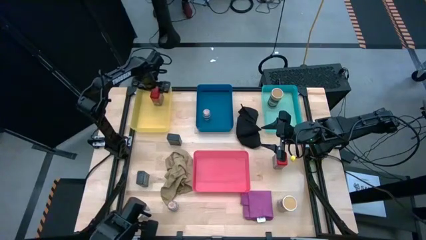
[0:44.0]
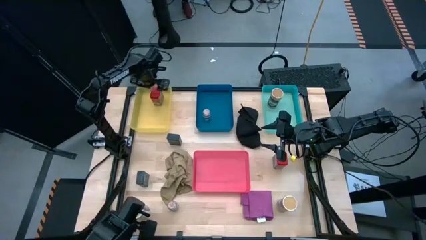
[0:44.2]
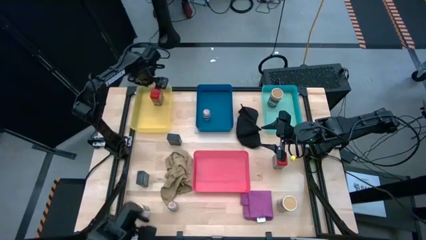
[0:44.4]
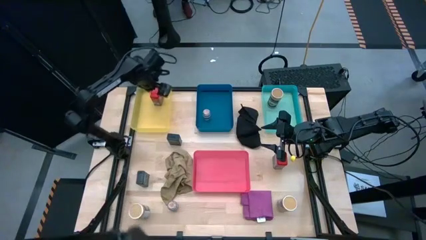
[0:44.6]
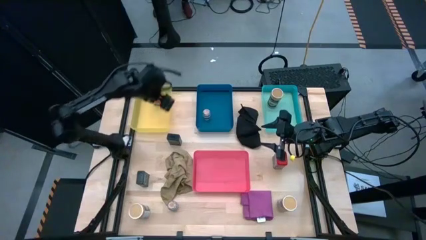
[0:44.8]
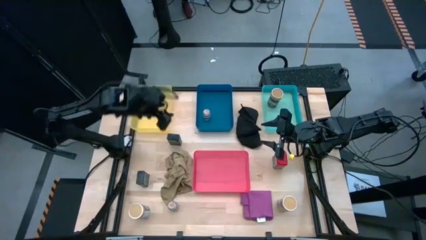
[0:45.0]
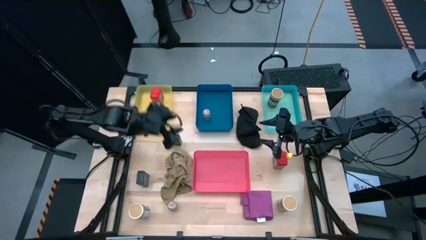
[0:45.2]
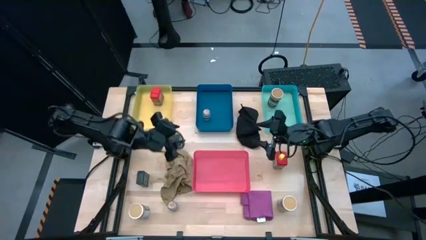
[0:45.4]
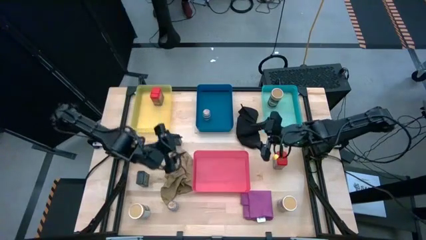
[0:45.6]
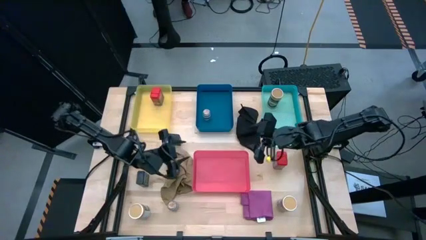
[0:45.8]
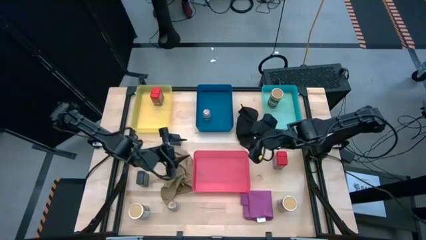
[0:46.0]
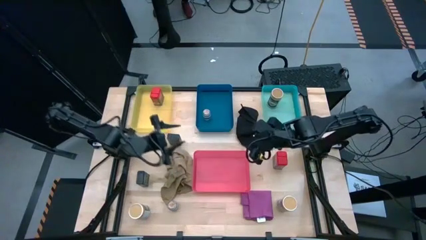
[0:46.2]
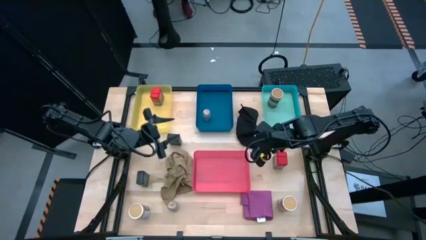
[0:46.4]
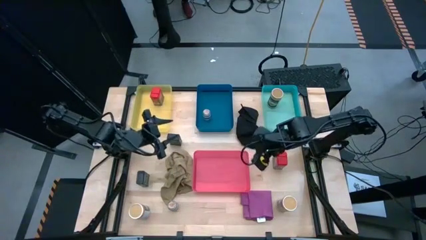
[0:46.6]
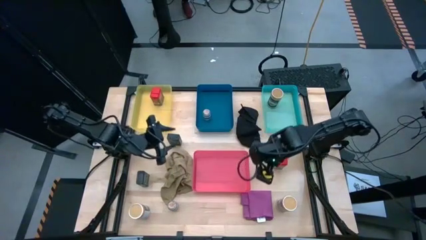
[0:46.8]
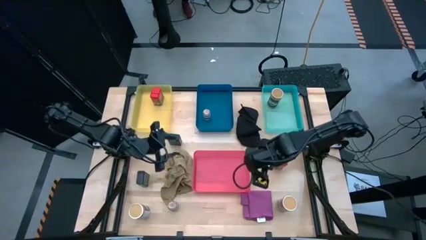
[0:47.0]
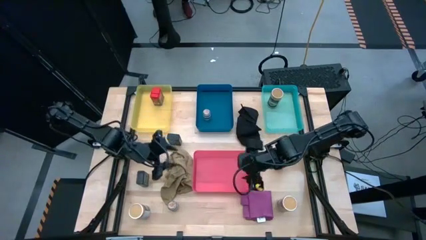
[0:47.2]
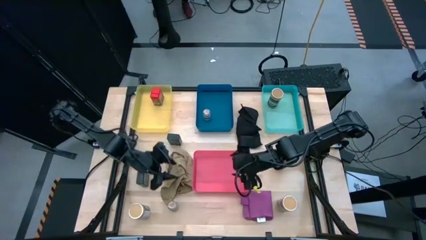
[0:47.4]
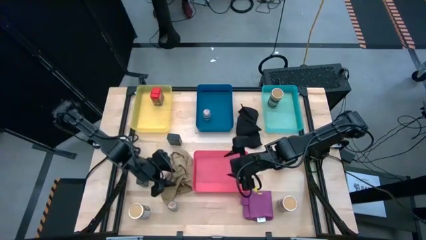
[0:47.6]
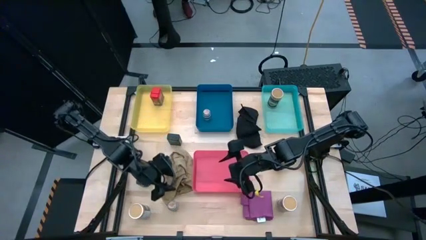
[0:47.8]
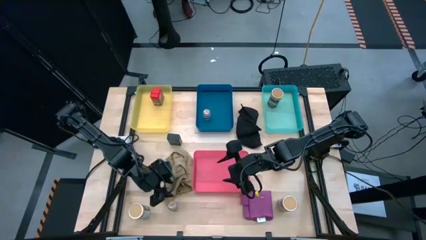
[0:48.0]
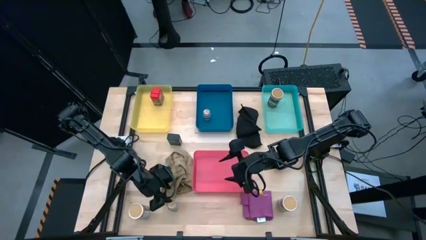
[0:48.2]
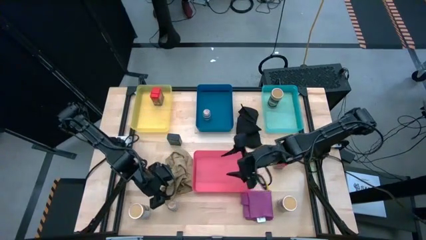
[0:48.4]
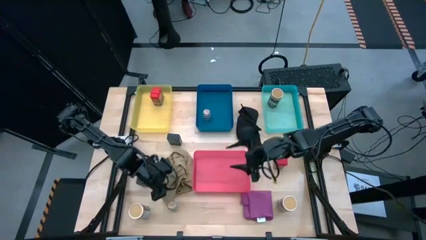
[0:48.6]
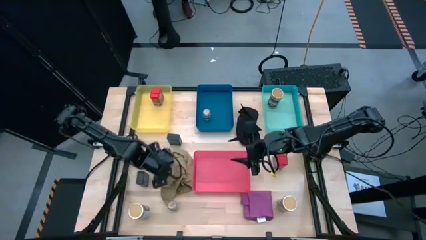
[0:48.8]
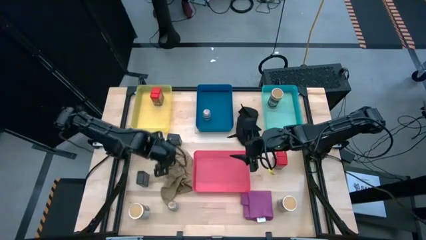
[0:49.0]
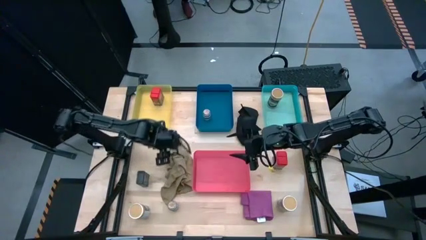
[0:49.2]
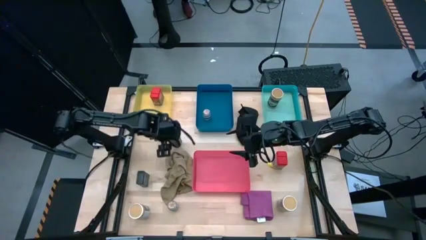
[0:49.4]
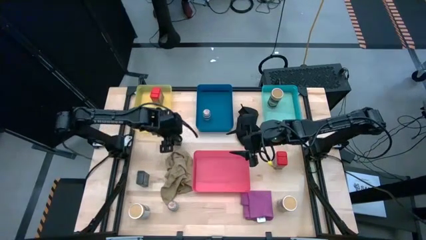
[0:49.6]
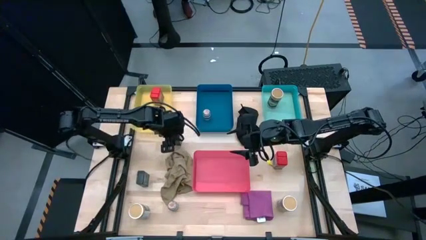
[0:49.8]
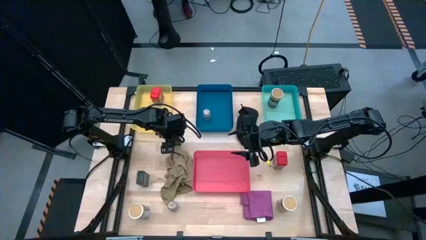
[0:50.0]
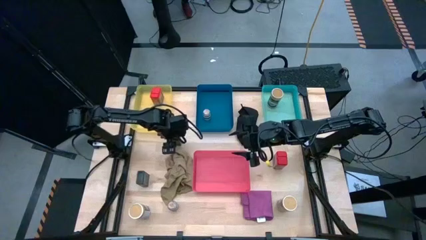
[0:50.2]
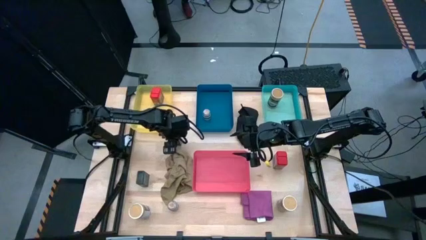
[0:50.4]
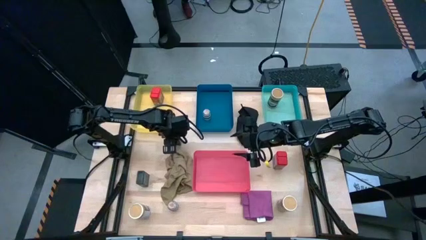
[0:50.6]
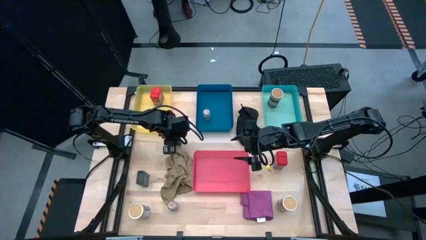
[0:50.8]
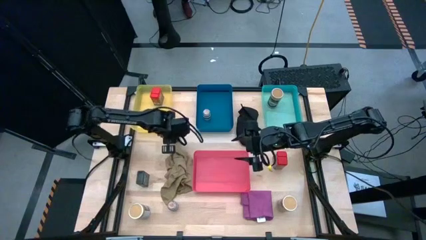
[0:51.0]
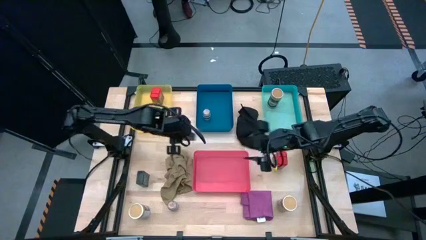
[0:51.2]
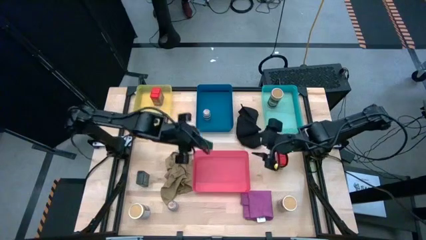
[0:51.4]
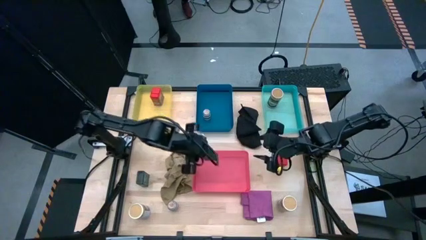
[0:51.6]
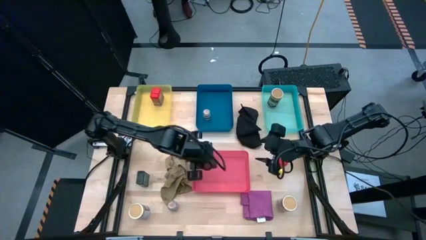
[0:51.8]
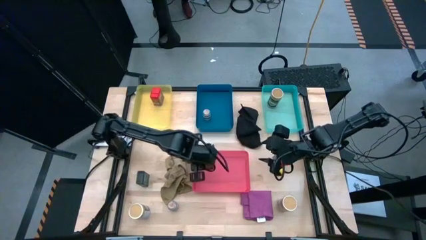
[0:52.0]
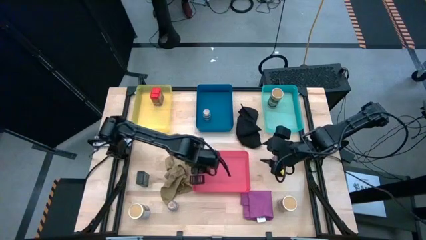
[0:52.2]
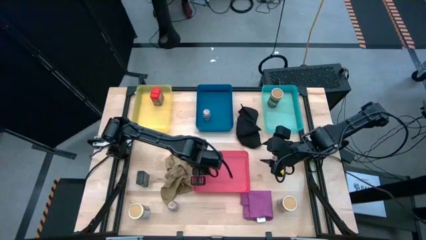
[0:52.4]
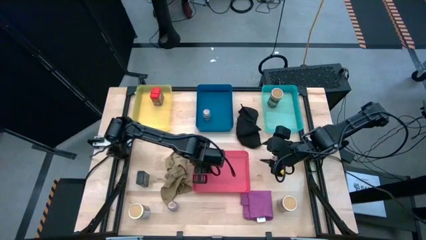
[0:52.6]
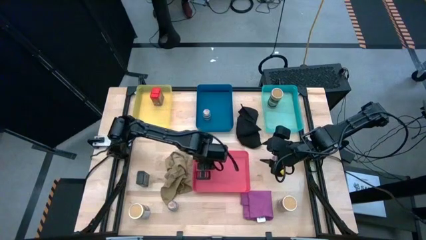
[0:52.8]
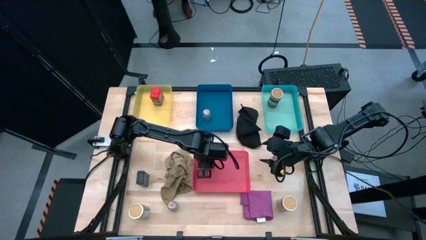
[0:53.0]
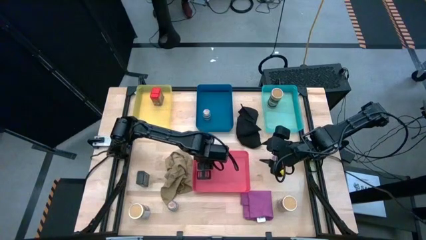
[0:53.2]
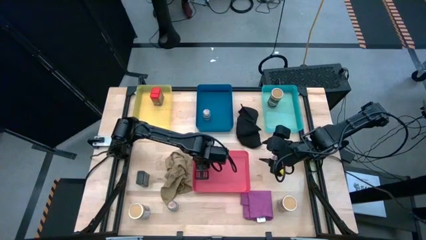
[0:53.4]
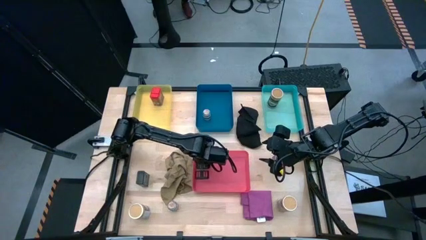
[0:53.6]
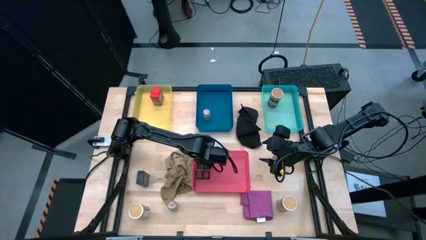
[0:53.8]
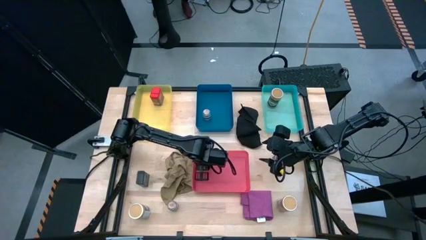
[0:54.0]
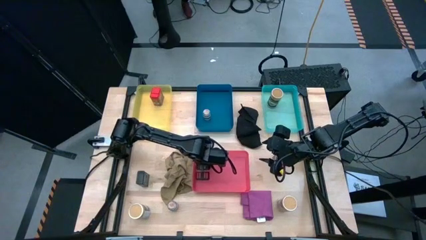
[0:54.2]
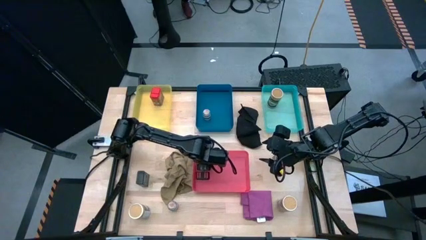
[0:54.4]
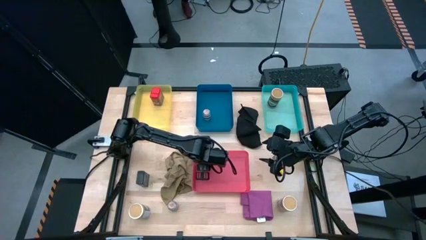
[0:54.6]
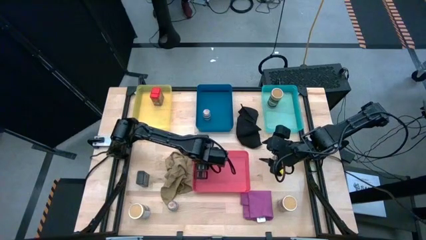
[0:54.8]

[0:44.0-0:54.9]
Task: Sort spices by type
Put the top black seasoning can into the red bin

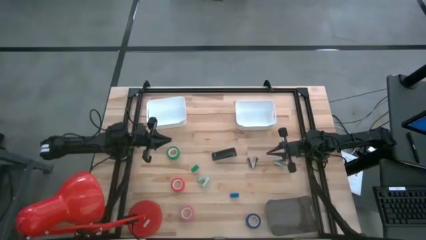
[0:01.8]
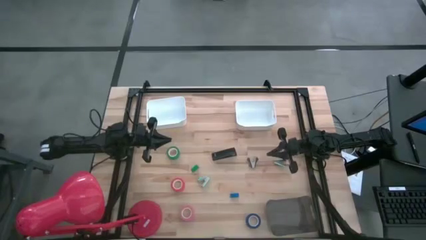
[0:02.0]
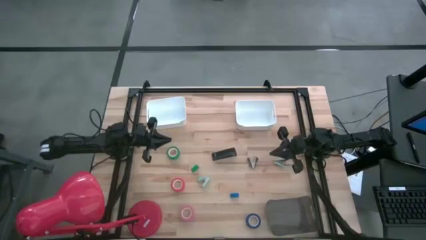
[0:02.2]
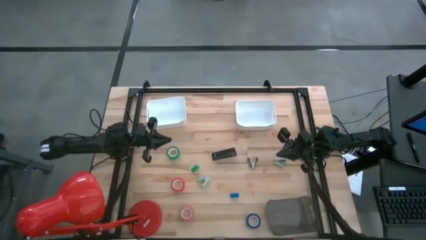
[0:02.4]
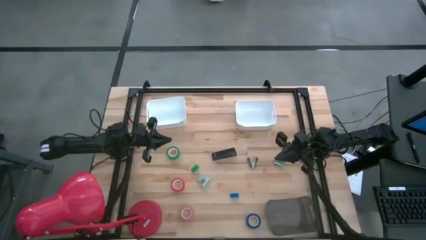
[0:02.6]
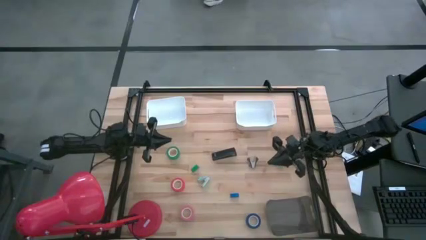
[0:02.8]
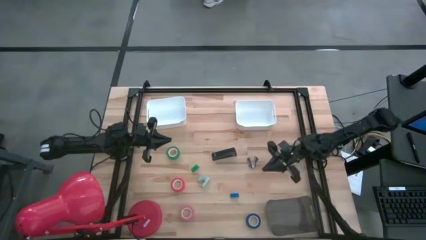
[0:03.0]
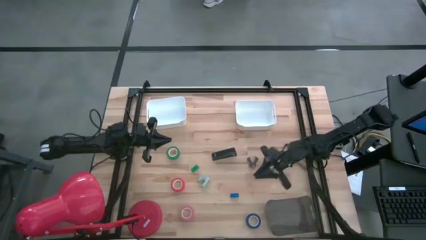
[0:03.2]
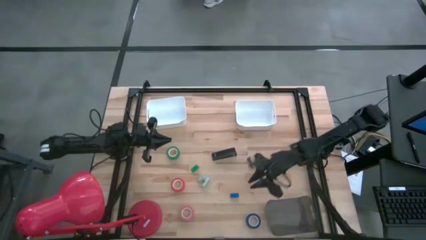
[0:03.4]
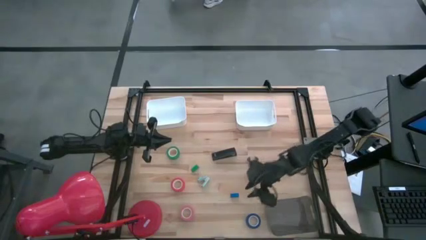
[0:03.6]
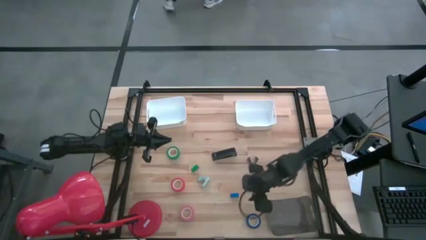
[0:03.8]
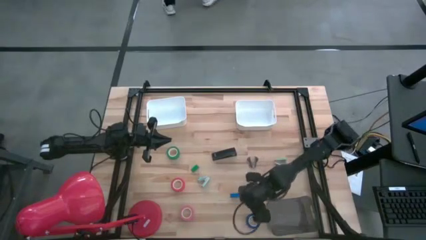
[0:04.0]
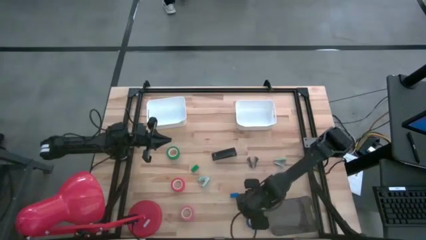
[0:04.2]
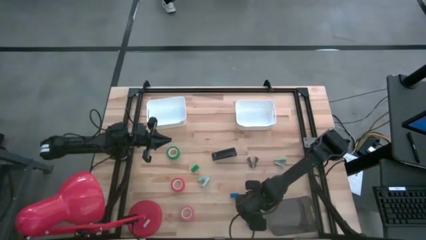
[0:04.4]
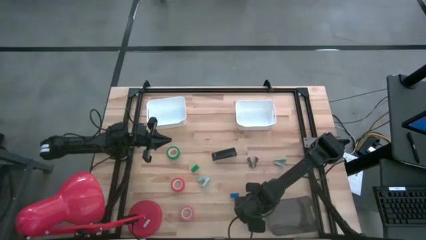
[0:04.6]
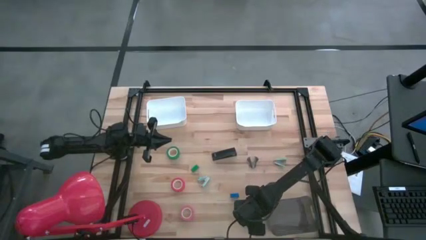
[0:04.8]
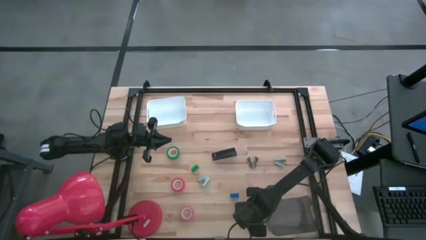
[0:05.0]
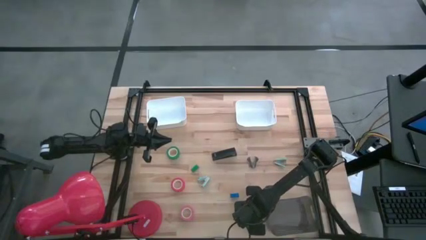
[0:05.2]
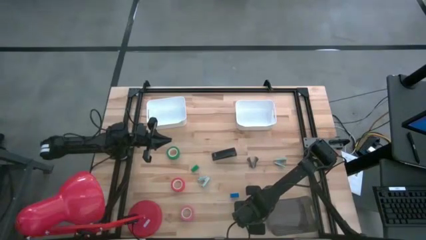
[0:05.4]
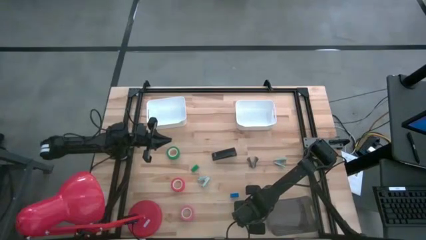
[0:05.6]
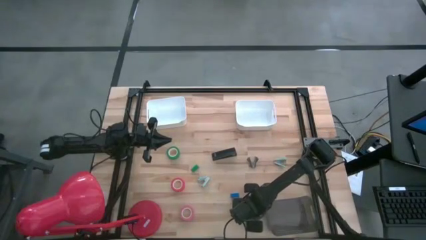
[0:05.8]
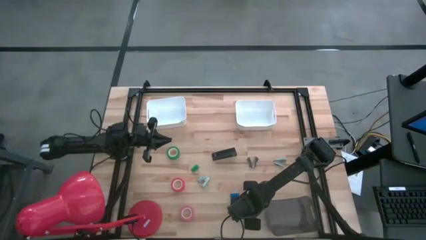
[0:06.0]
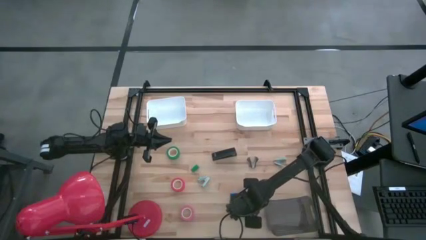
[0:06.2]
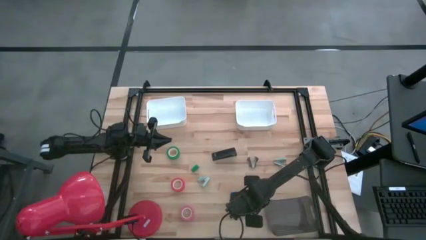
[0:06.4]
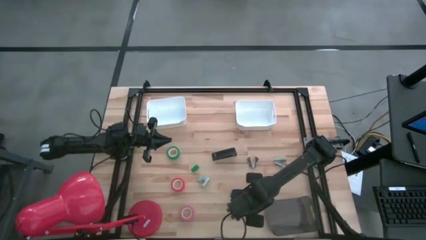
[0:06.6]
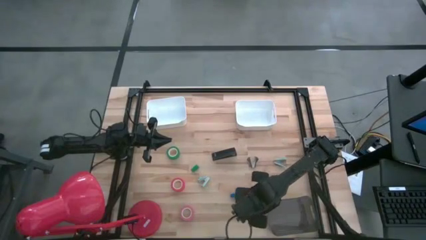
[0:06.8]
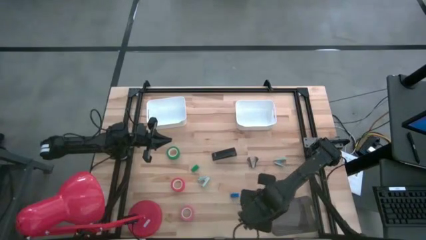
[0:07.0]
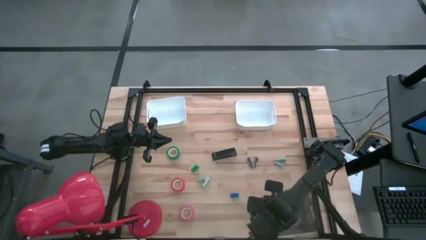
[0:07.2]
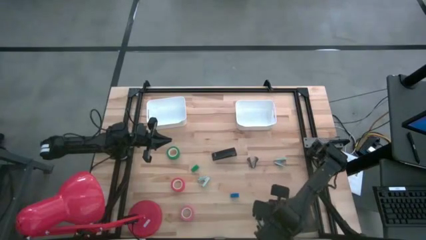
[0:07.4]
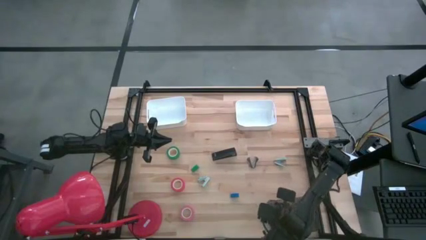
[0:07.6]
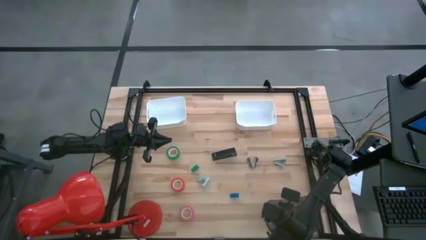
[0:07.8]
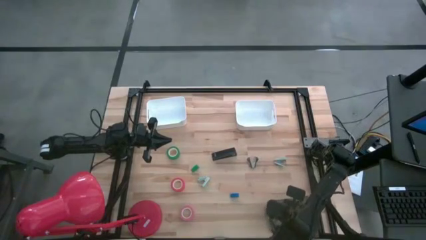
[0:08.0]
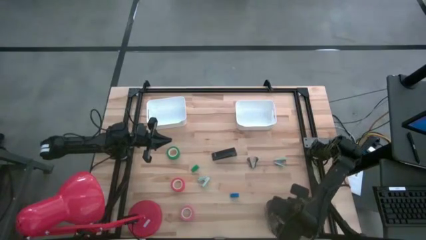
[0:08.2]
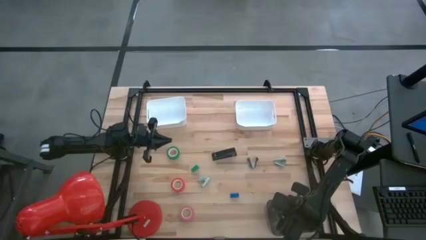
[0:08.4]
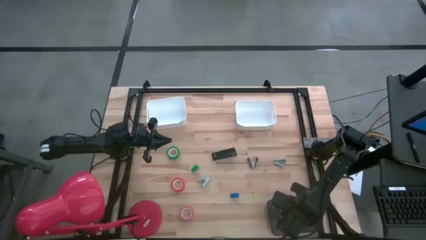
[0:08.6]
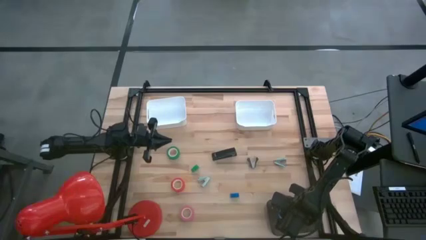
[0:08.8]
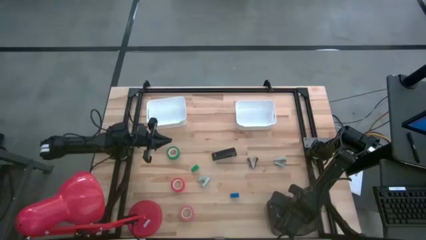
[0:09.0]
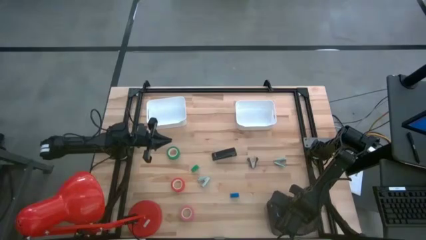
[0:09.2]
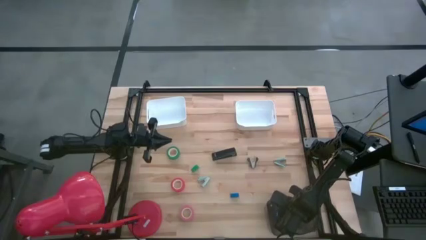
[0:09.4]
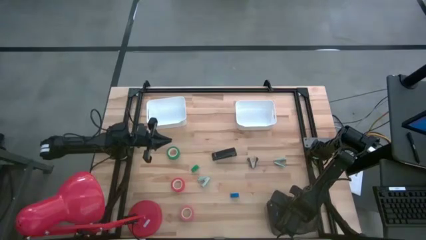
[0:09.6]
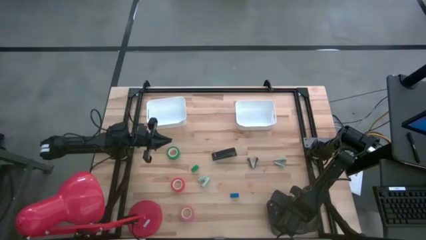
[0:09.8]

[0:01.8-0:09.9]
Task: Pick and place Stapler, Stapler remover, tape
Put the blue tape into the black bin
